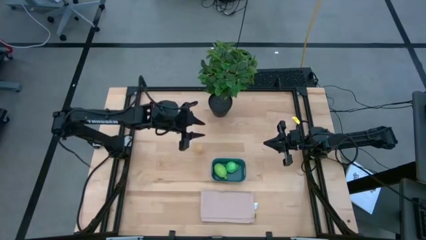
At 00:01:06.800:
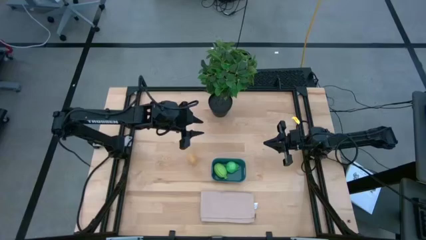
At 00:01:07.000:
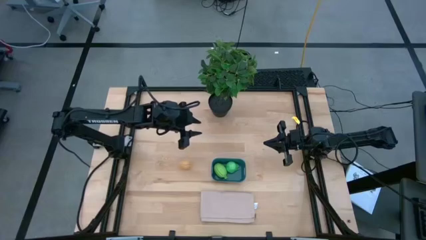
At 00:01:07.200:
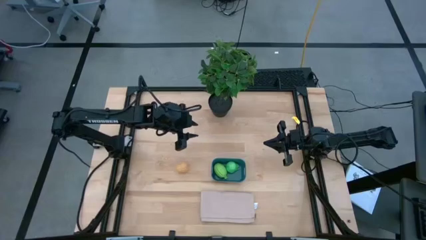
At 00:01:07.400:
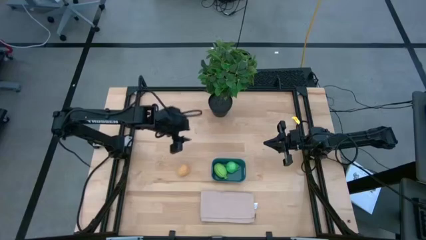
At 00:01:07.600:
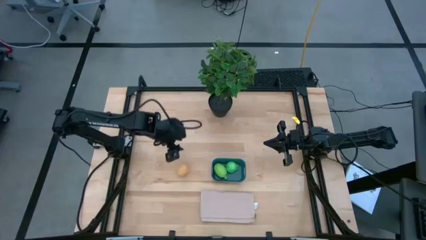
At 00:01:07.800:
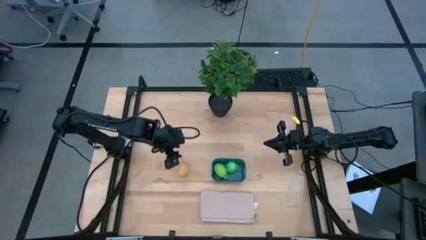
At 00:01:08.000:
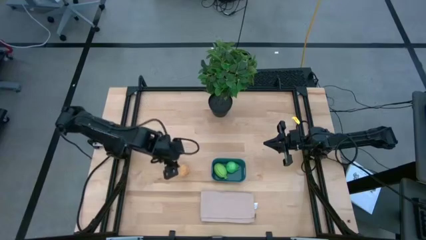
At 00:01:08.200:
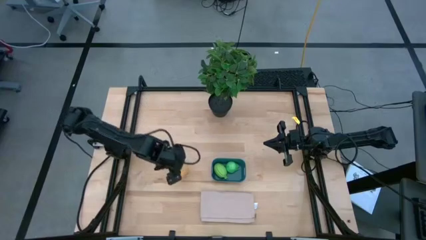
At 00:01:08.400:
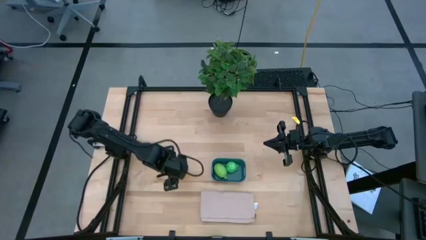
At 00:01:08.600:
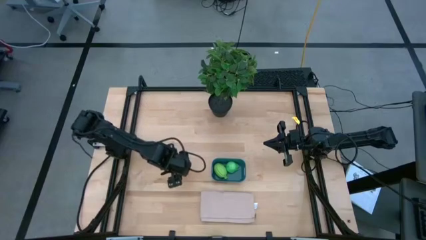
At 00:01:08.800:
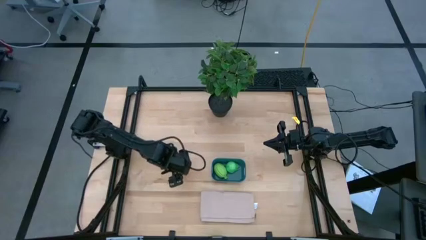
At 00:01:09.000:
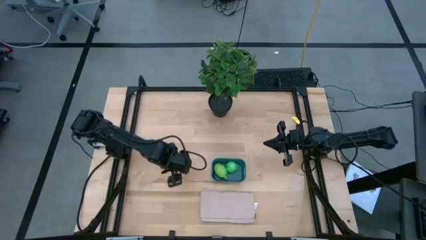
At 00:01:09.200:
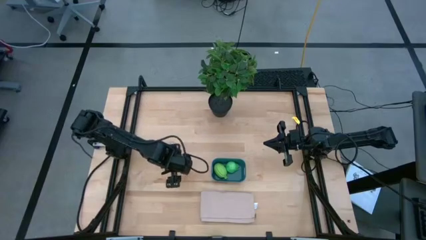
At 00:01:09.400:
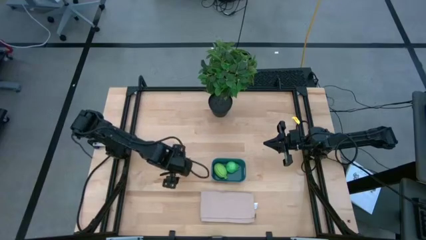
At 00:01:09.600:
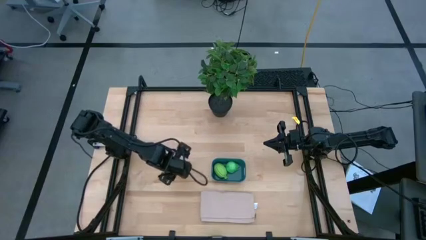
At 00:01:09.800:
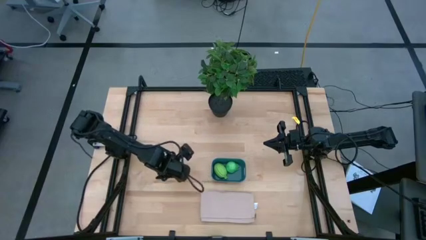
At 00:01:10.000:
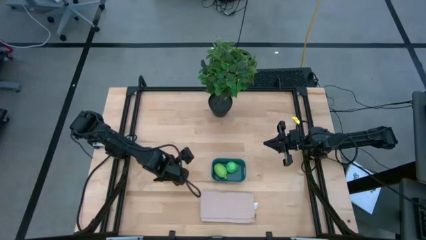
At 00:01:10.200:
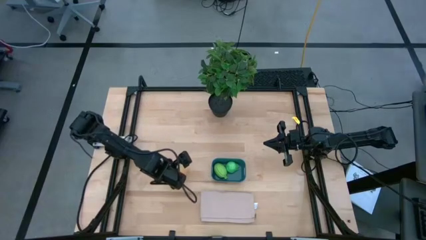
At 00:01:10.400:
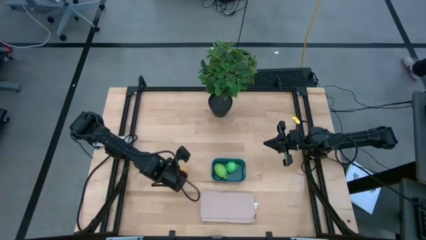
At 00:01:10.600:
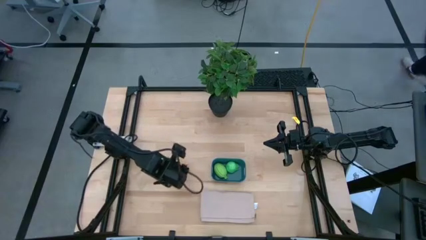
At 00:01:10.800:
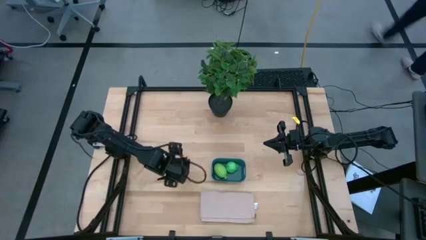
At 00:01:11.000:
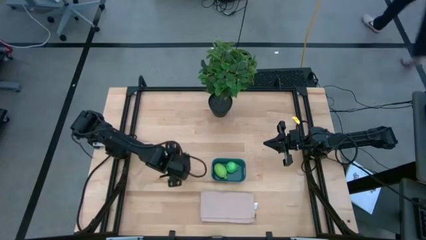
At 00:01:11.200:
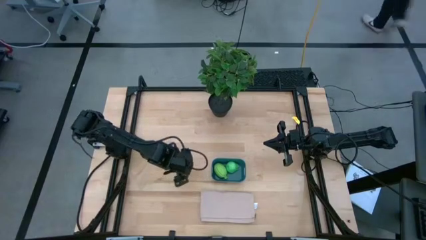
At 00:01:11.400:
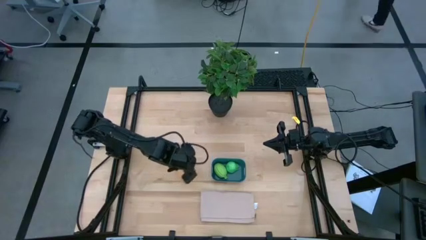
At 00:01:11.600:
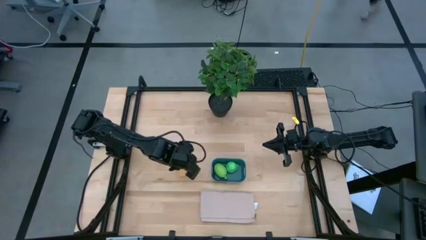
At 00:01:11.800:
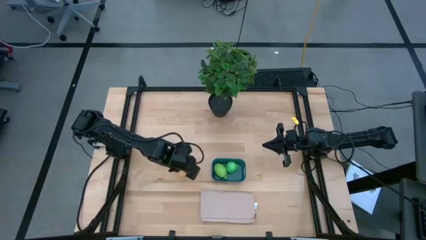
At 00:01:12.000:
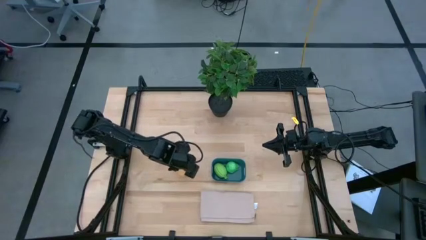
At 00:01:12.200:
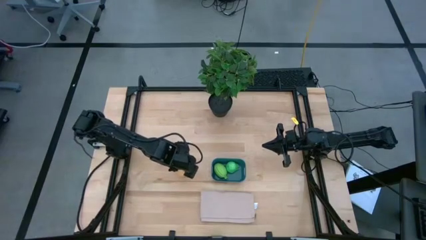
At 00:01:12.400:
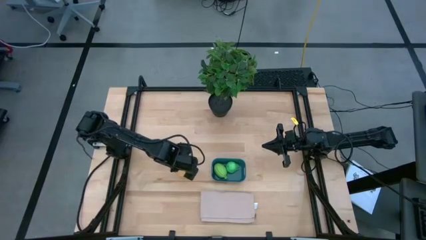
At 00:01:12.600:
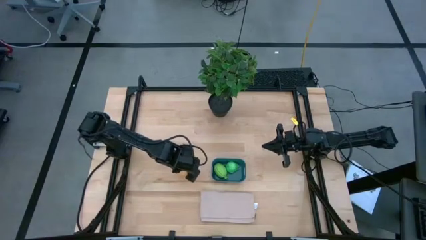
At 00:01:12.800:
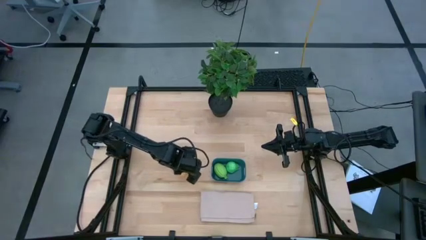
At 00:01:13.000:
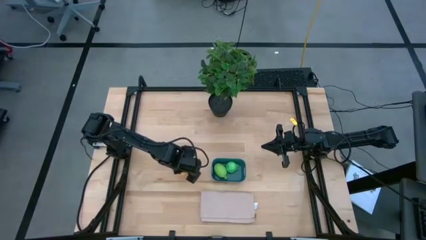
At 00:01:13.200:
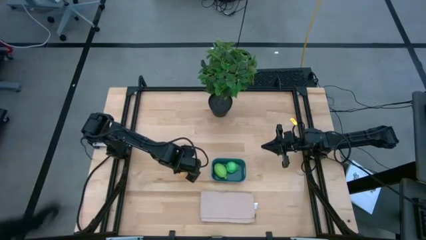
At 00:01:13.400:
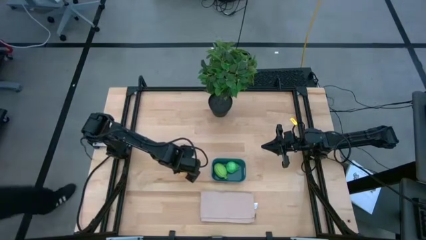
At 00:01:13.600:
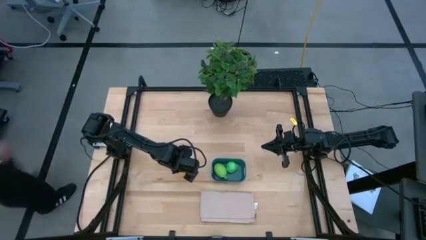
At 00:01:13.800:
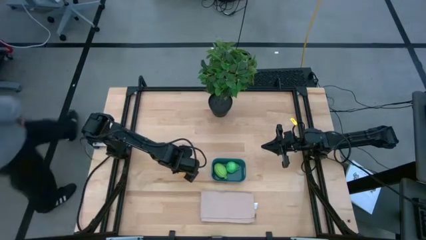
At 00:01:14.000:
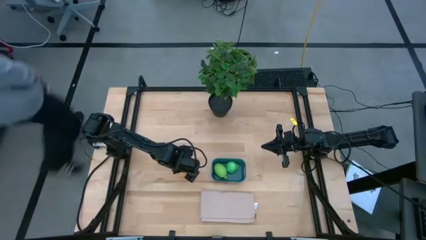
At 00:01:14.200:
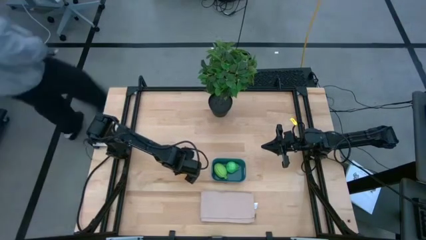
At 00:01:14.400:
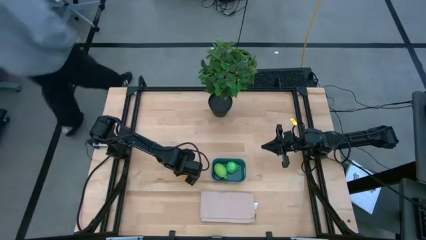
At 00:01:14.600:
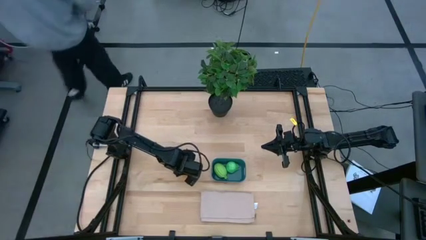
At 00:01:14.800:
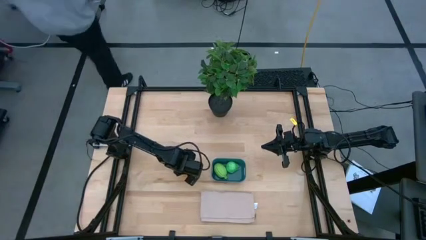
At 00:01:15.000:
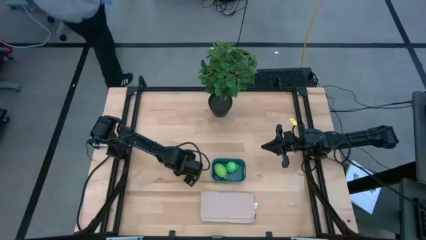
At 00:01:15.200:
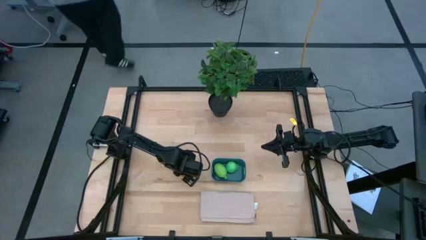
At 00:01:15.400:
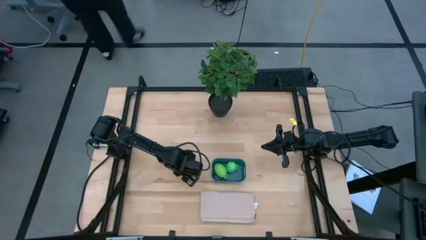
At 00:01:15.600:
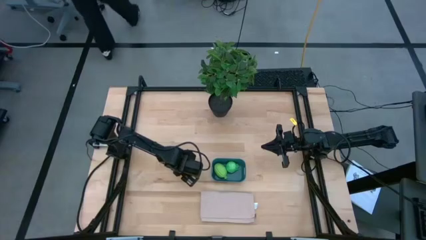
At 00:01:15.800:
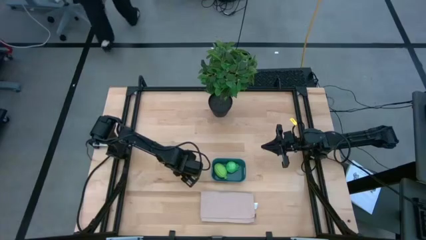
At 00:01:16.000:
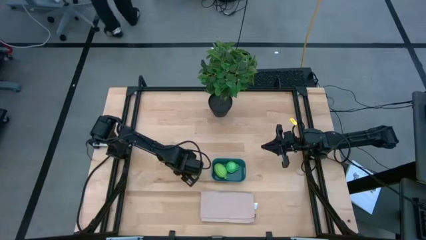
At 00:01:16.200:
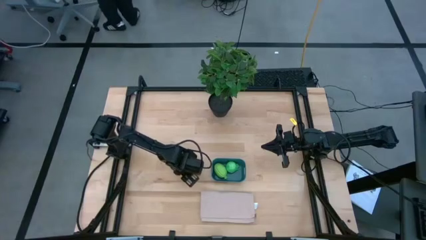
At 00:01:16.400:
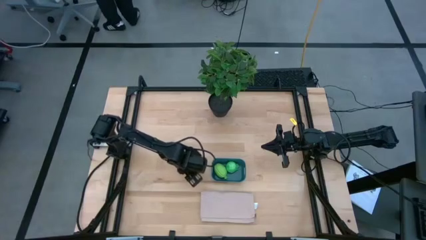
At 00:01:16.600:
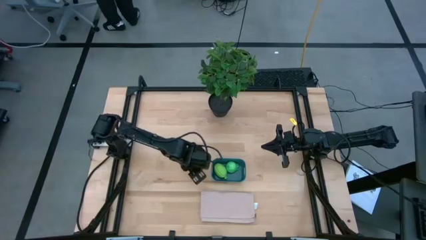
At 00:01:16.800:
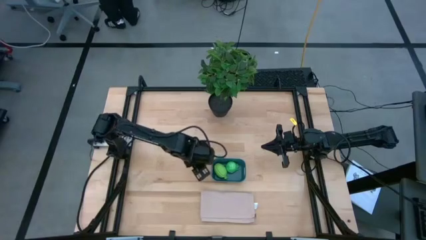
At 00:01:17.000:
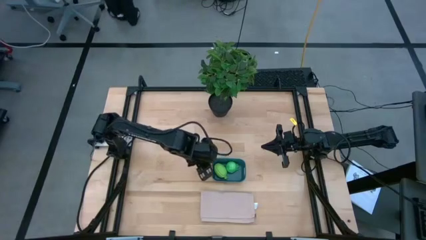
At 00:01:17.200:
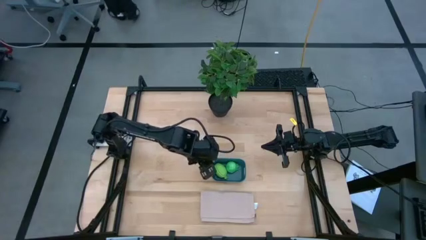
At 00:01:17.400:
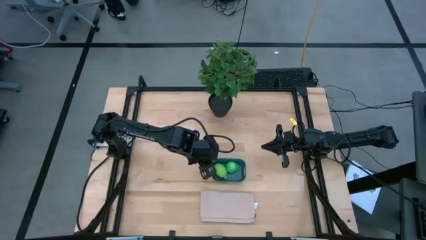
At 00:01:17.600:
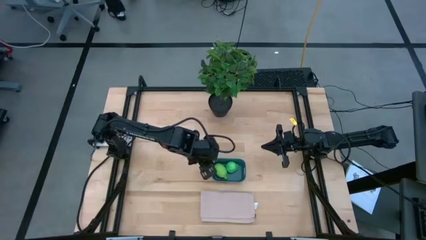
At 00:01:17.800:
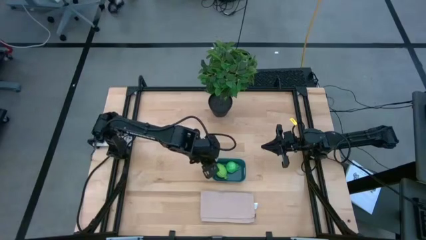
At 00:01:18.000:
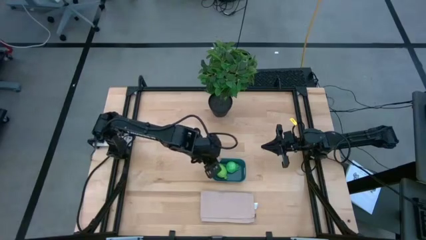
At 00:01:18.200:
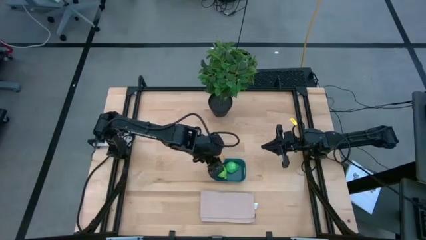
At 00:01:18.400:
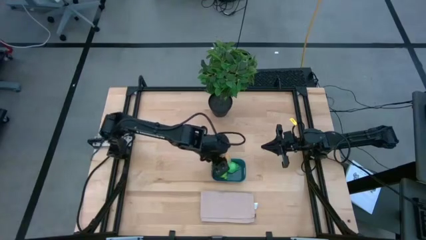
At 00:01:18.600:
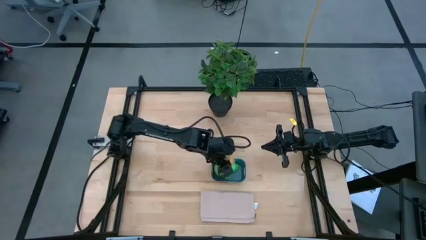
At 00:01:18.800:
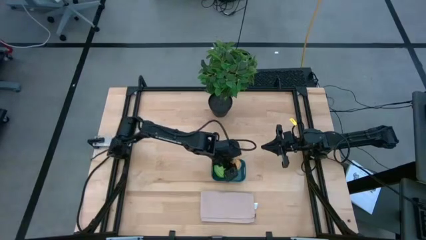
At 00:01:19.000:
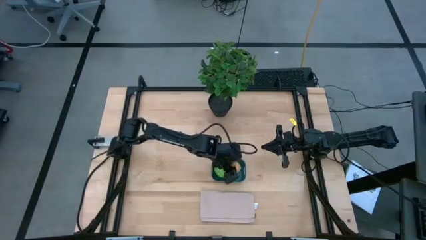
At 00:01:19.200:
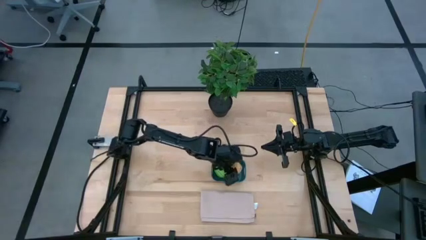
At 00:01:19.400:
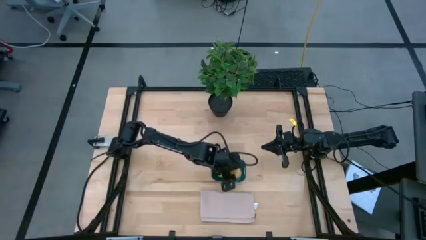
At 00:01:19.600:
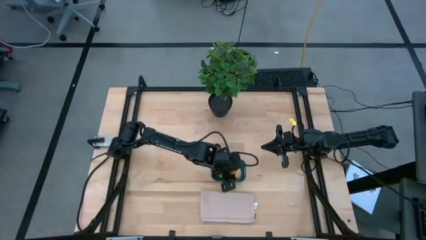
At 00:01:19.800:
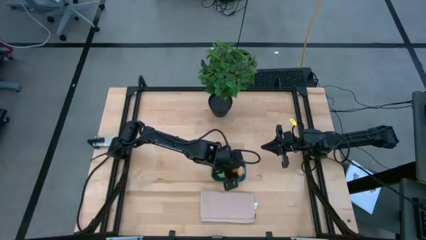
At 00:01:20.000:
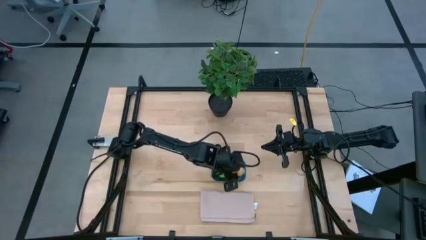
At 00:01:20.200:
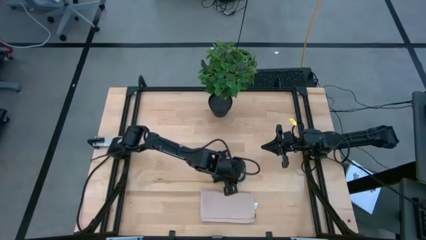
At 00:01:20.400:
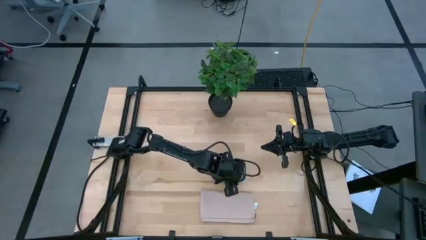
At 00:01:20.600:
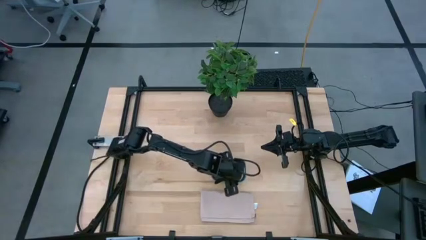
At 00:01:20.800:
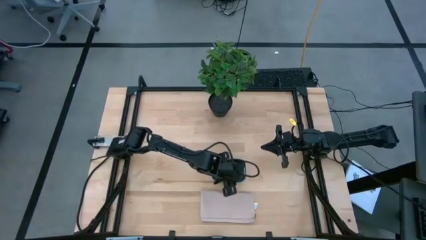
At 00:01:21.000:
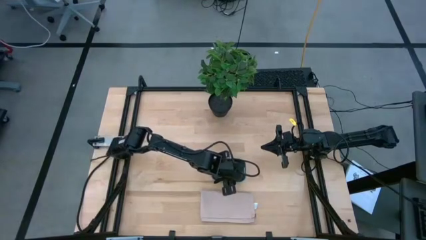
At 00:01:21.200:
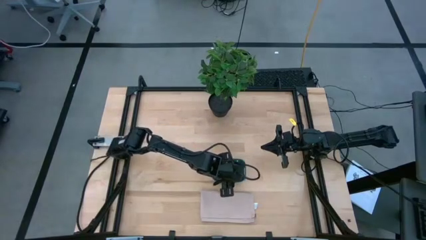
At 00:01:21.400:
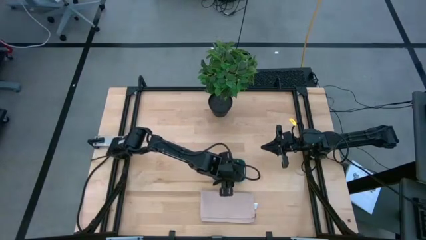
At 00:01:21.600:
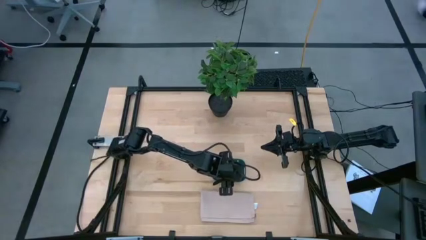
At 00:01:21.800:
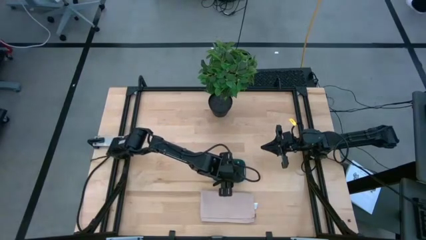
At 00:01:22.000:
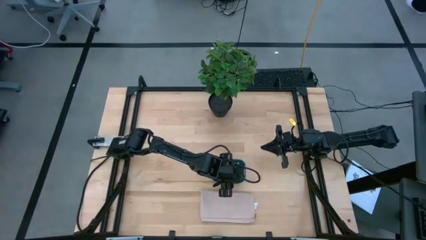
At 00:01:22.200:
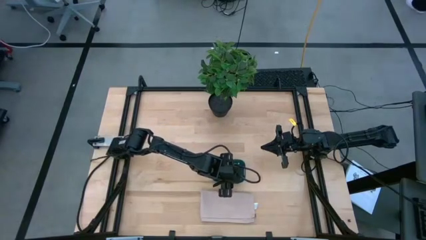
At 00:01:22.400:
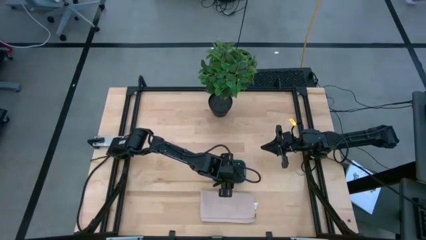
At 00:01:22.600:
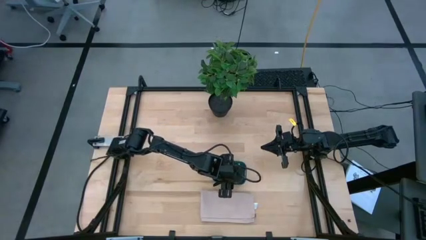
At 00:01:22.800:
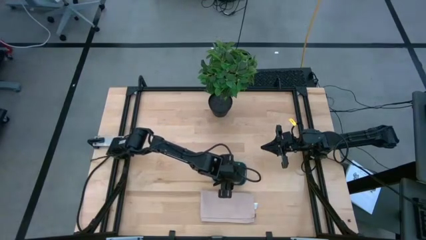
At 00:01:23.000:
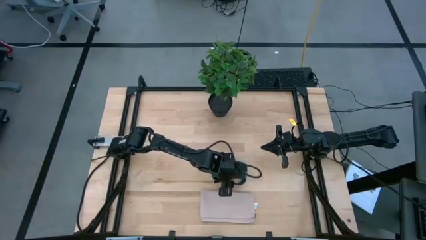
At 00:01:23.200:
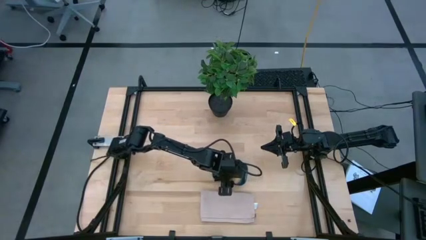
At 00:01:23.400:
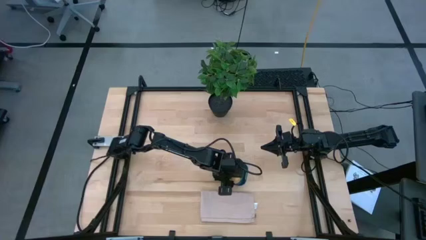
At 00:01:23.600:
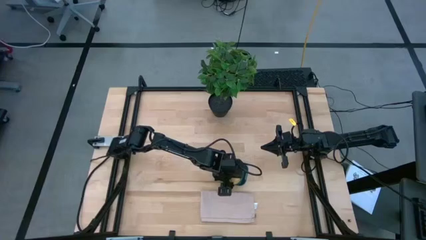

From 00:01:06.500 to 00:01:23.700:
Task: Pick and placing Produce into tupperware
Put the brown potato into the blue bin
